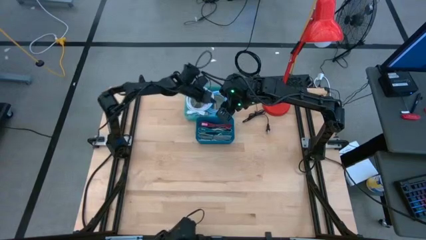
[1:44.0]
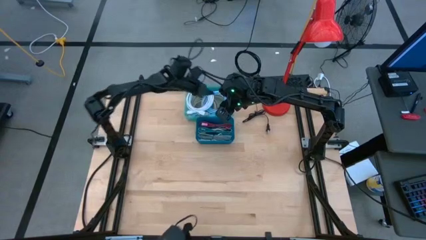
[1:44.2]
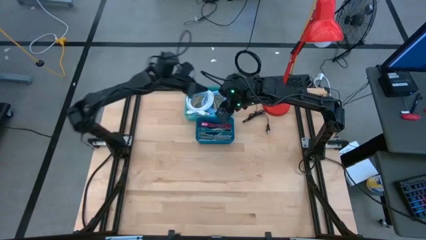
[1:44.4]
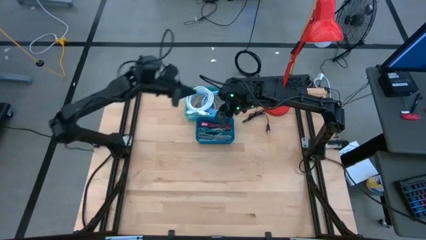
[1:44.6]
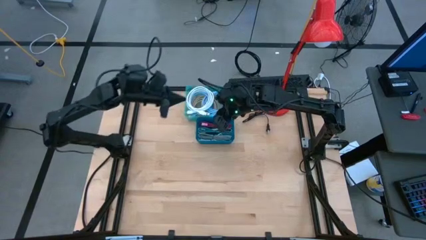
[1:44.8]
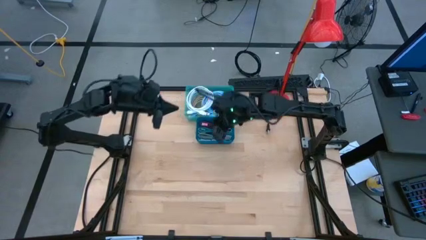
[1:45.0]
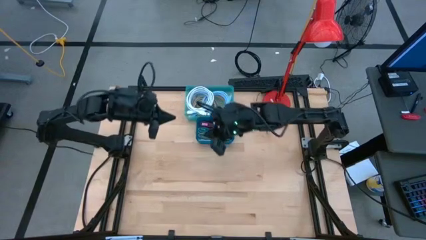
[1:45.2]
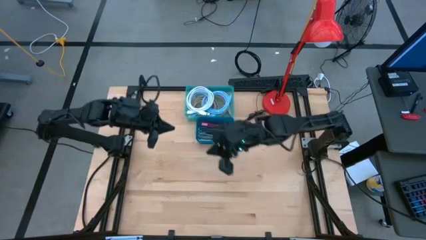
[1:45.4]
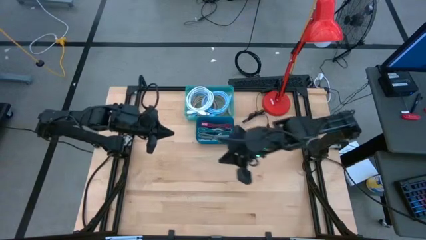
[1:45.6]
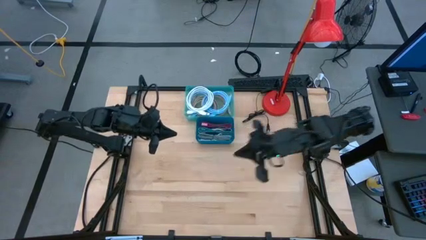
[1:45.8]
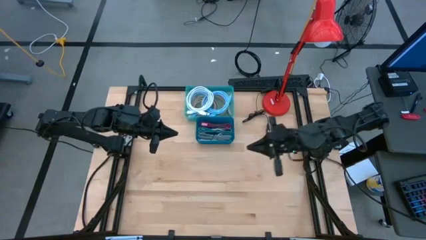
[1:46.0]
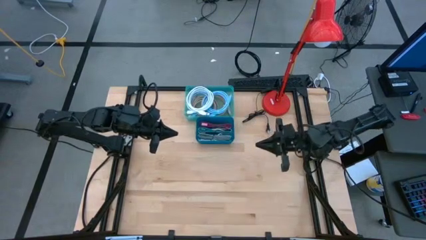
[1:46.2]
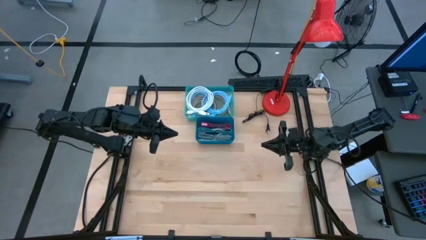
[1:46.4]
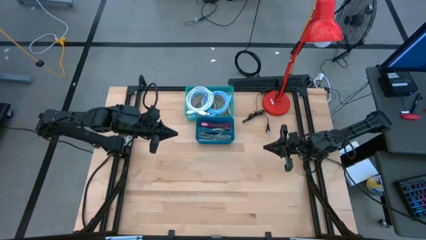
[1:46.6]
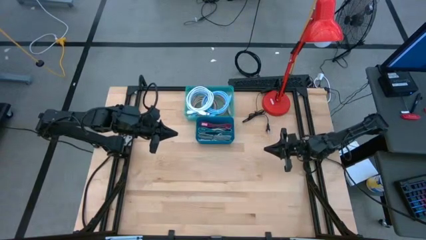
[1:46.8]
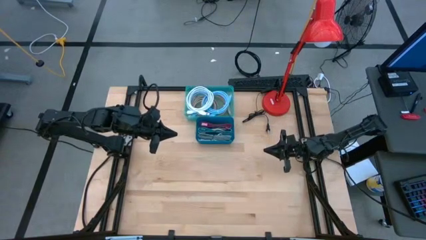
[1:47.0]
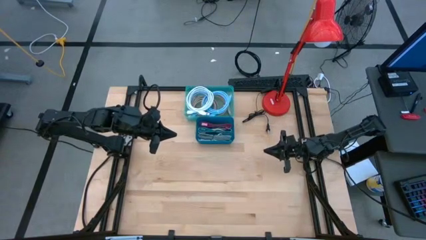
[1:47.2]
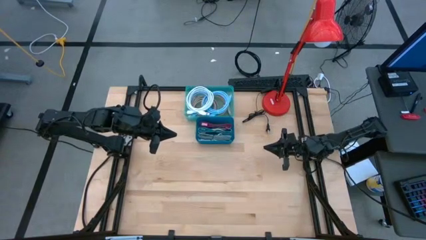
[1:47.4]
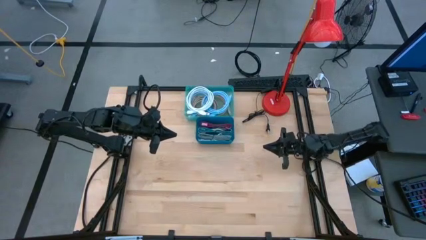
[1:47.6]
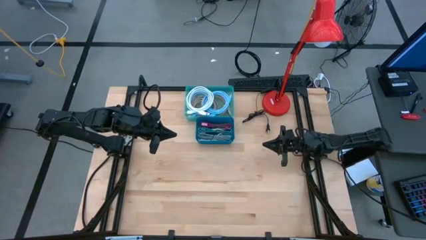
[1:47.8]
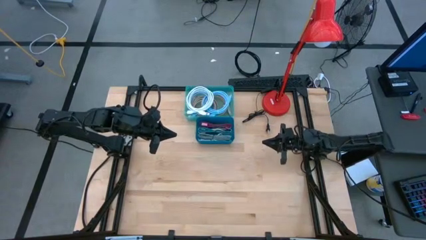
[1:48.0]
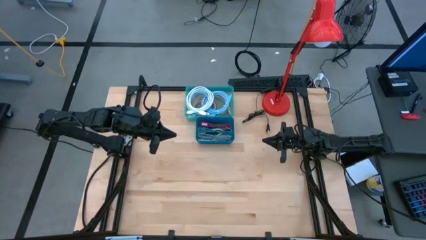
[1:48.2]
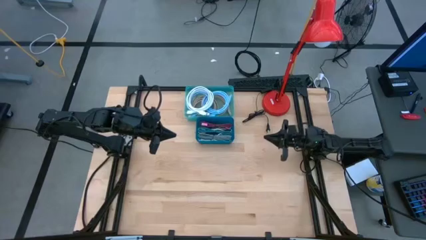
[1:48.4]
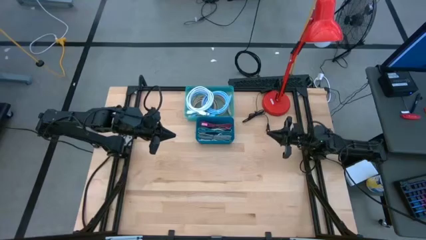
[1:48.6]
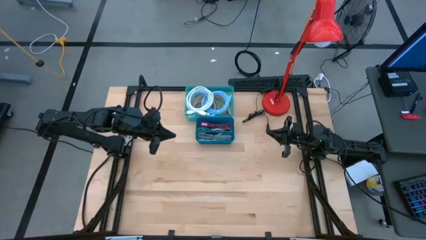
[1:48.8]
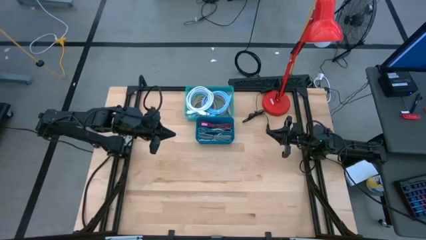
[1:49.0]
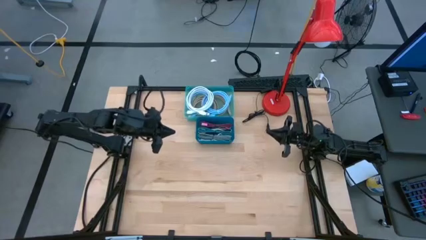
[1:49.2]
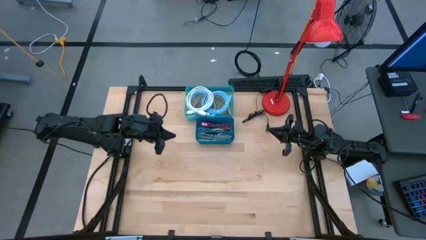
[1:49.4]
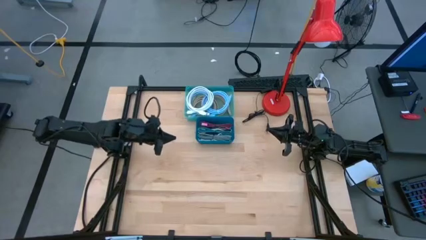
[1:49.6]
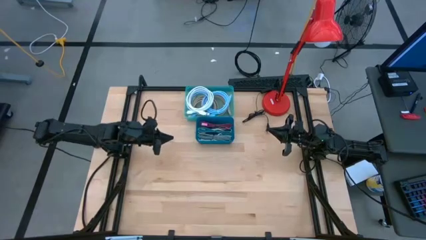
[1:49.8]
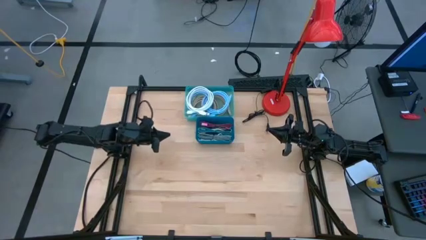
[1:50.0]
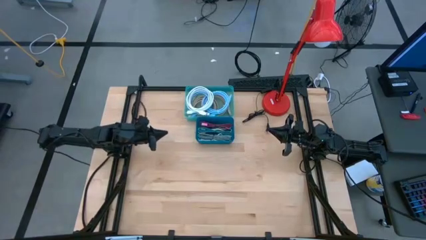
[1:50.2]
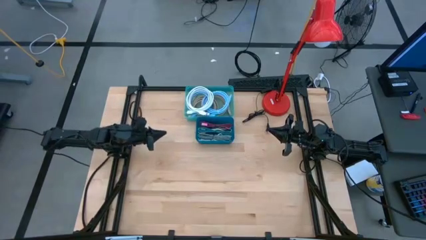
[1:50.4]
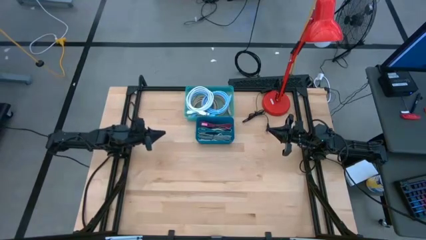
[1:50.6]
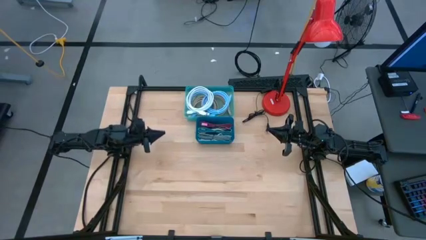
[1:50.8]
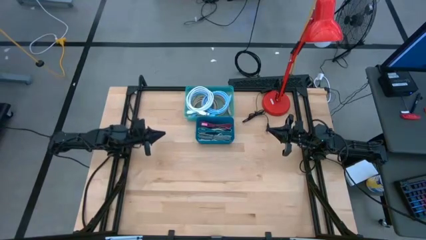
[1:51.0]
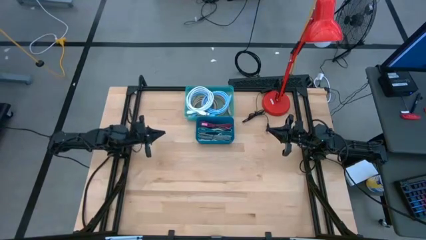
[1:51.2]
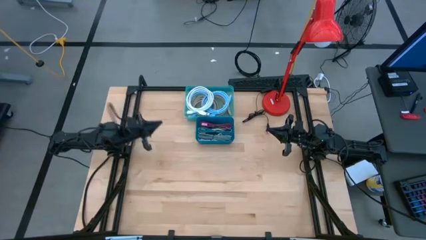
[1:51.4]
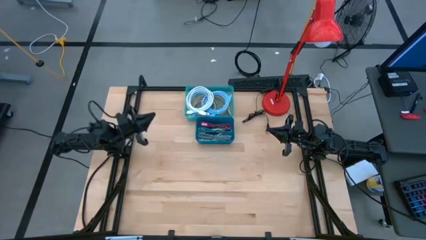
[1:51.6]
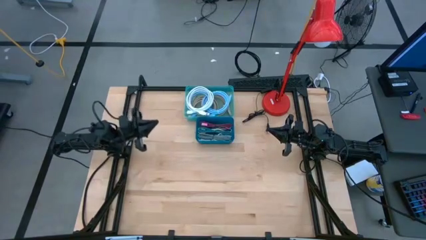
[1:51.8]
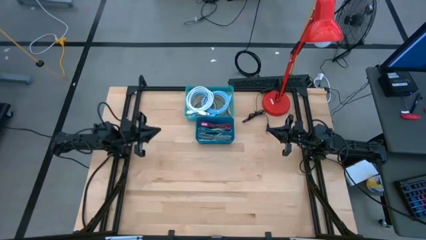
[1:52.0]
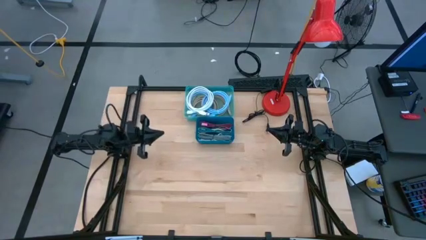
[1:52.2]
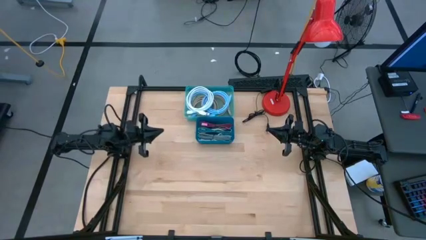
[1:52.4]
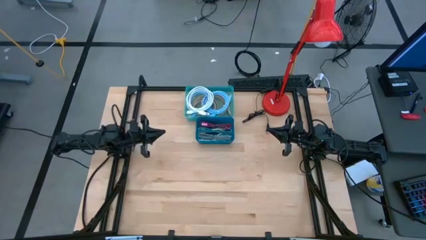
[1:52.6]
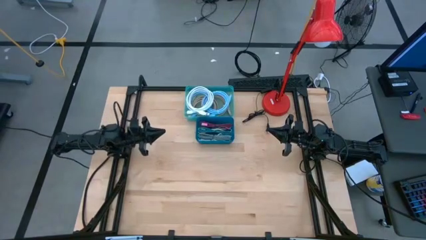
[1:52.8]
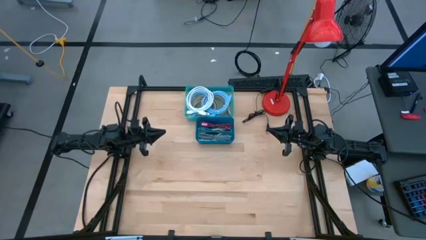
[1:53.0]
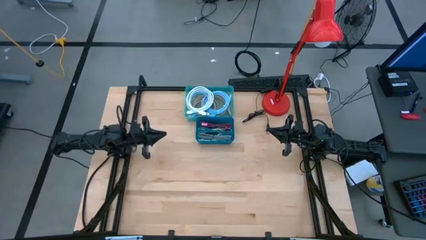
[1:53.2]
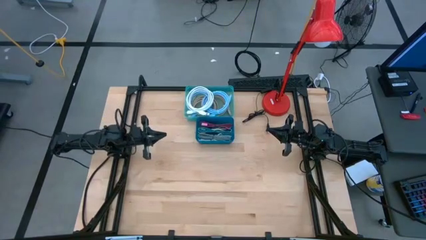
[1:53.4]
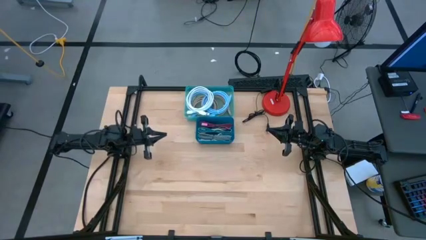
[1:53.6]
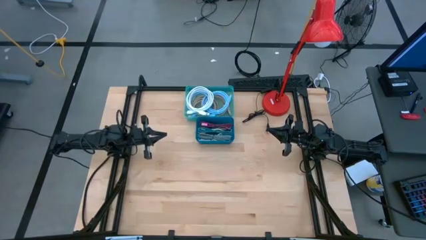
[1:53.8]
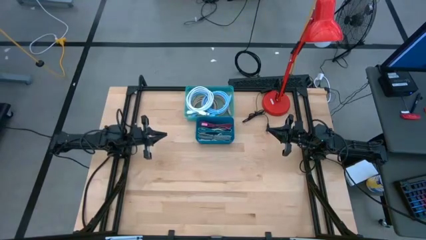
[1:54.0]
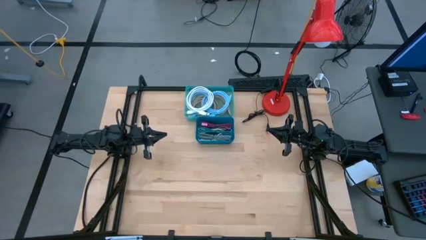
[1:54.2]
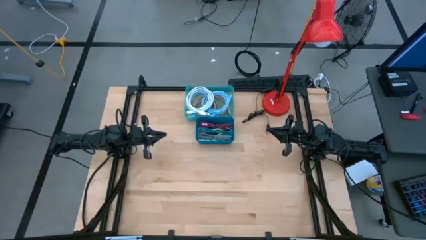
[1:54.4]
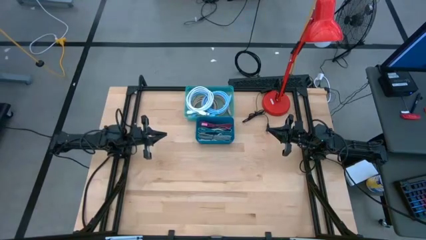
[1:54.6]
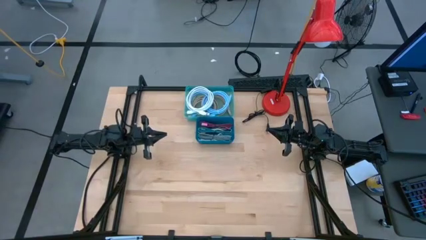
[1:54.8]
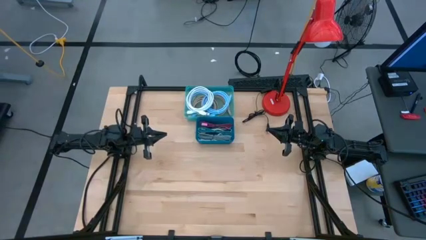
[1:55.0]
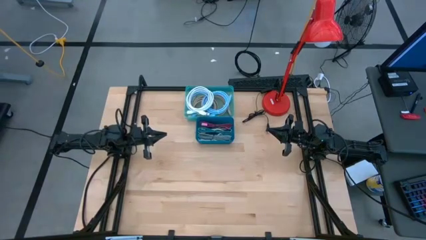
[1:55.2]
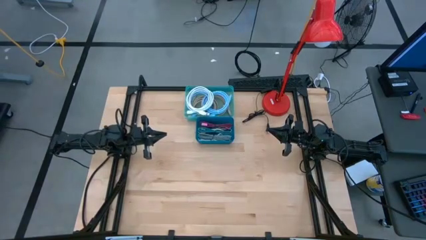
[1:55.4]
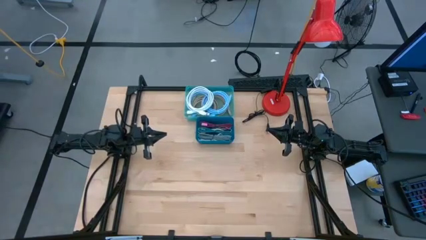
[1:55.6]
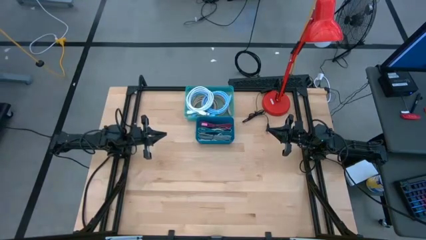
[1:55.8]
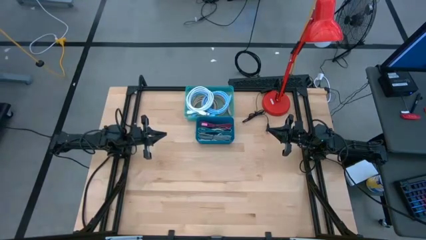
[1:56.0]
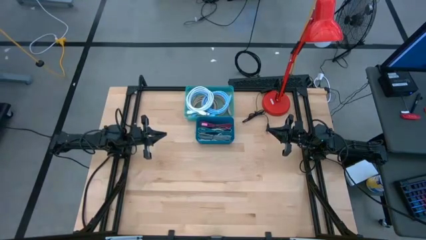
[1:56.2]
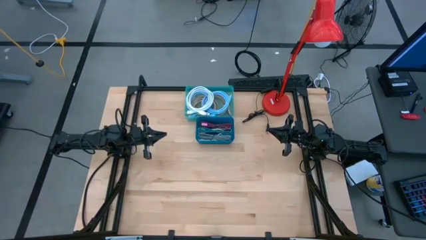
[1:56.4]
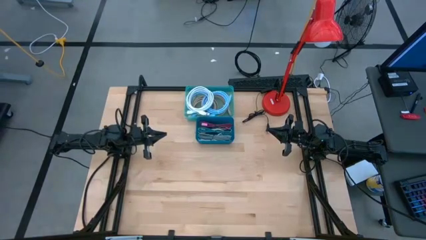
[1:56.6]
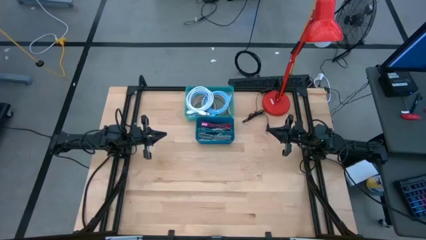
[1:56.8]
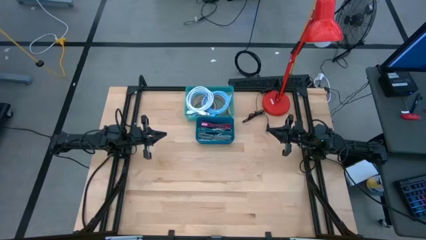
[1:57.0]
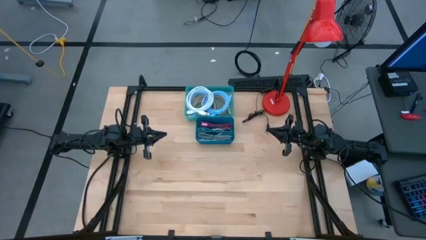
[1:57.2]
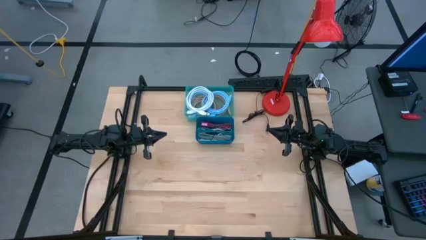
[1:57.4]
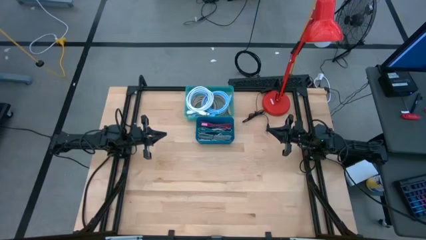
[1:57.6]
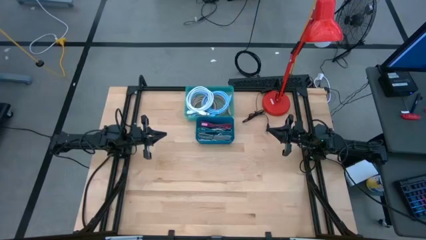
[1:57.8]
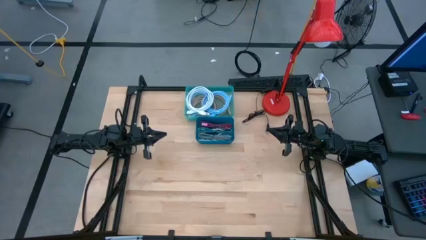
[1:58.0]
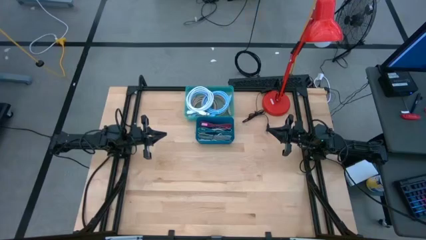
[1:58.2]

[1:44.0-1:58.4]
Task: Pick & Place USB Port
Return to Home Position
